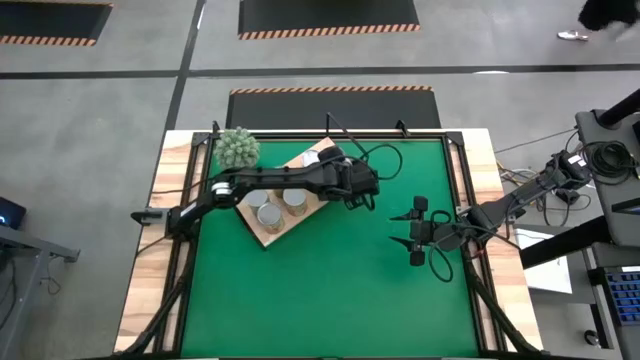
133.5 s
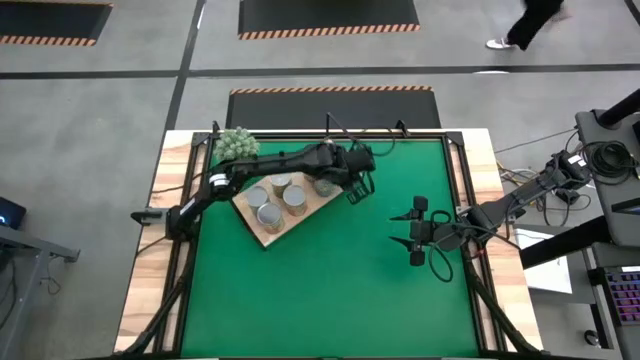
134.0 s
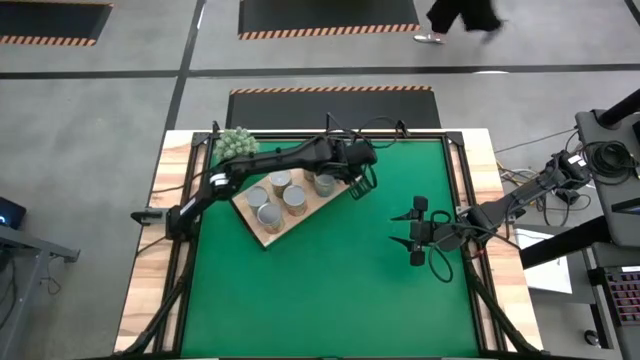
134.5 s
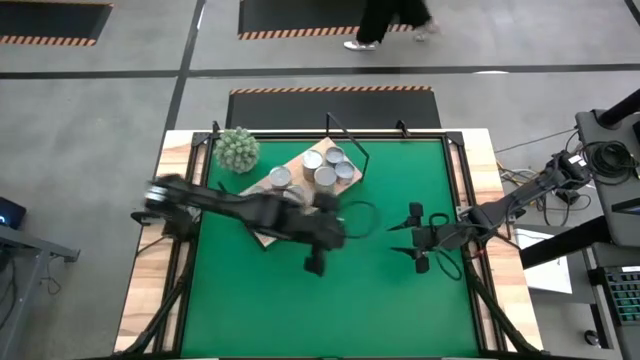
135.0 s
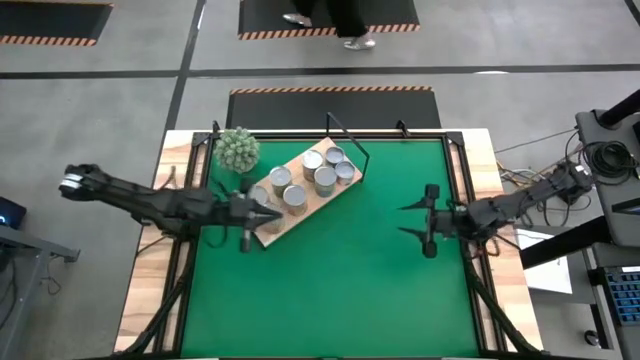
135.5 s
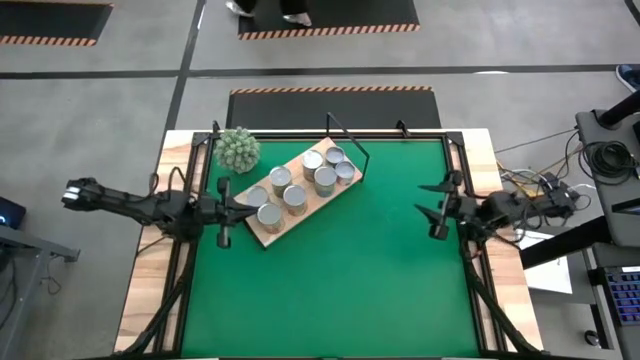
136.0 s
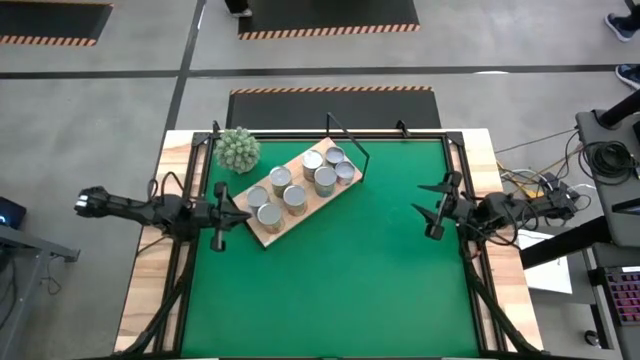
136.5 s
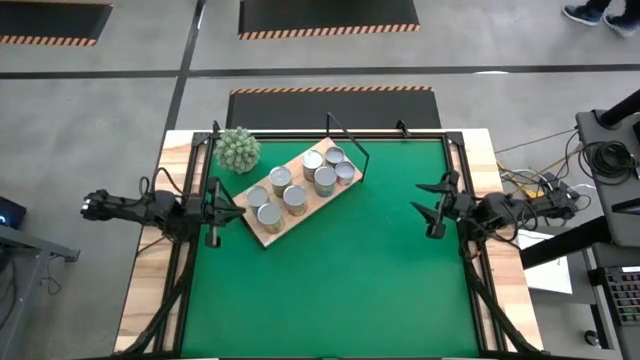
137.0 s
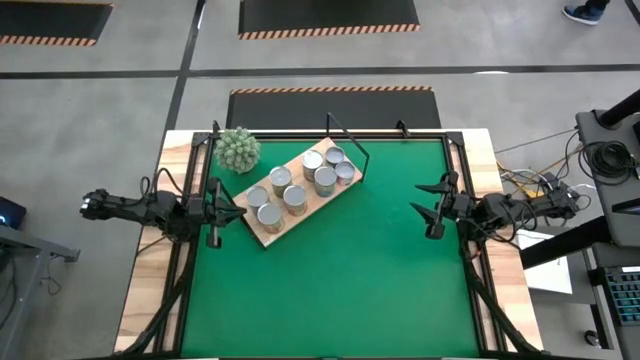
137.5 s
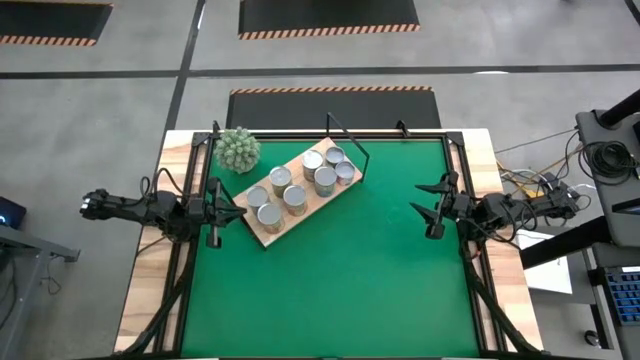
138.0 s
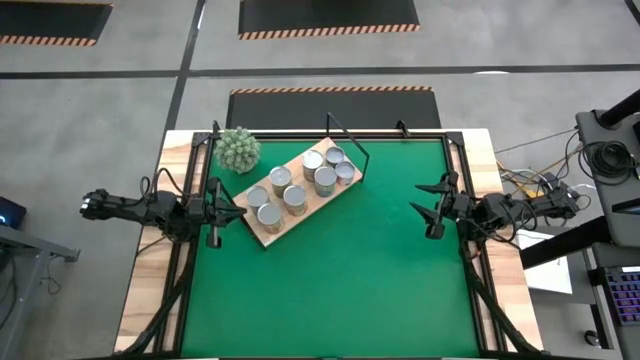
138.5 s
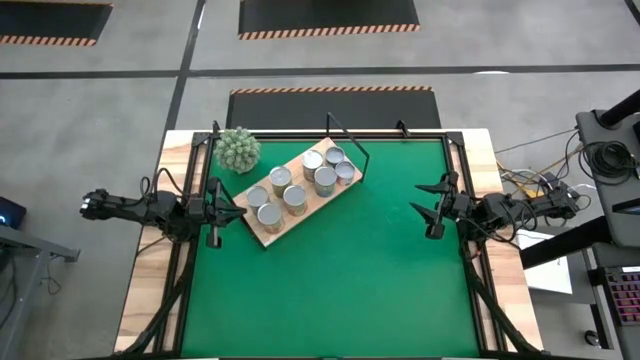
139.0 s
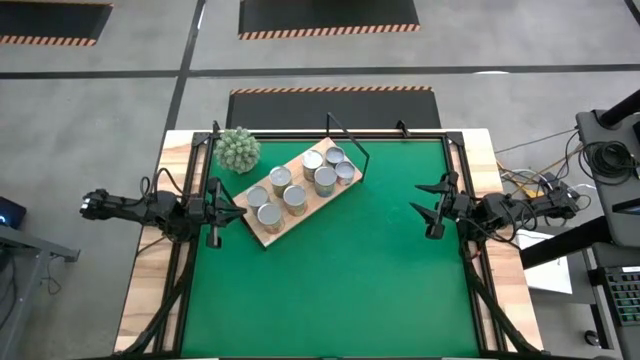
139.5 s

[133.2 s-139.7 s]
Task: Pick and place cans onto a shelf
Return to Home Position

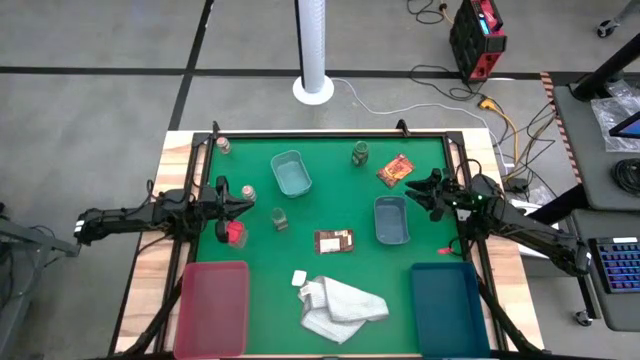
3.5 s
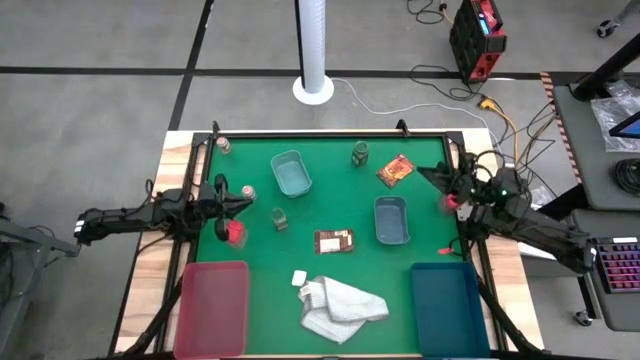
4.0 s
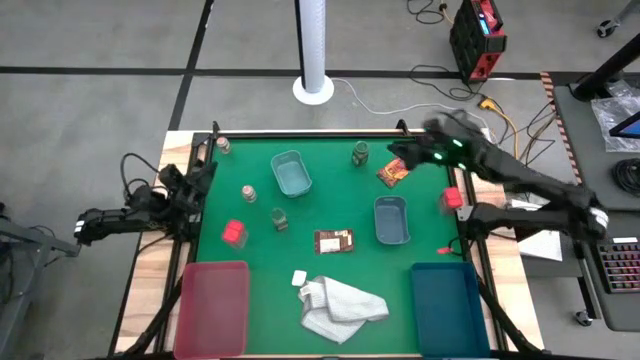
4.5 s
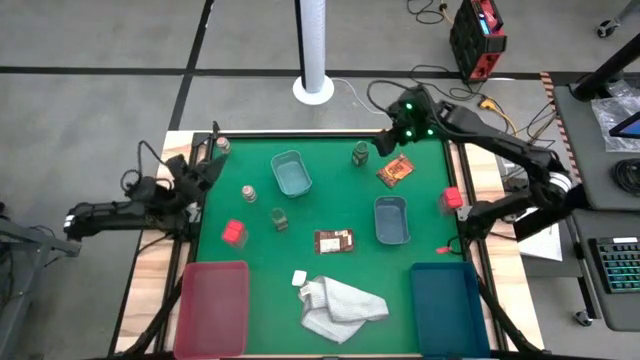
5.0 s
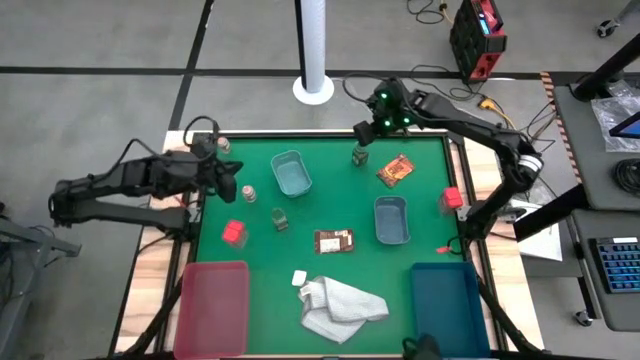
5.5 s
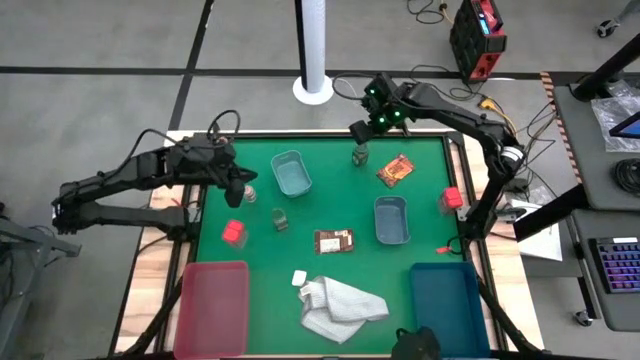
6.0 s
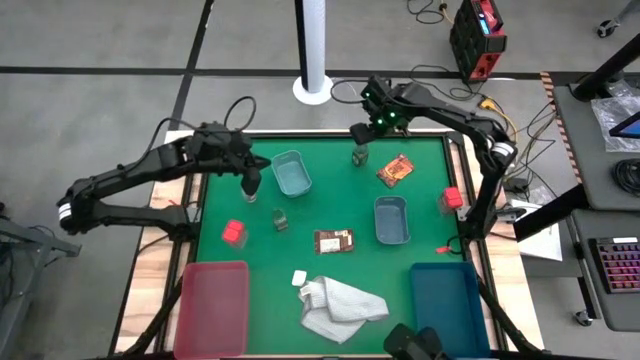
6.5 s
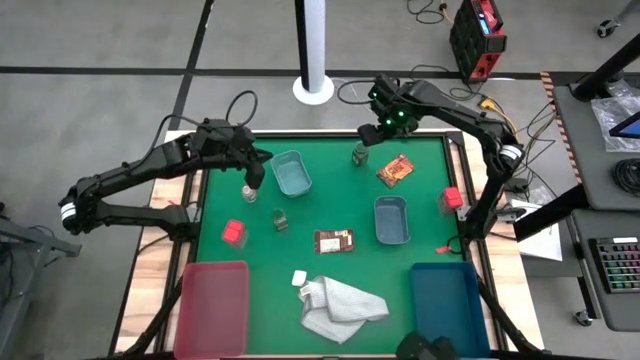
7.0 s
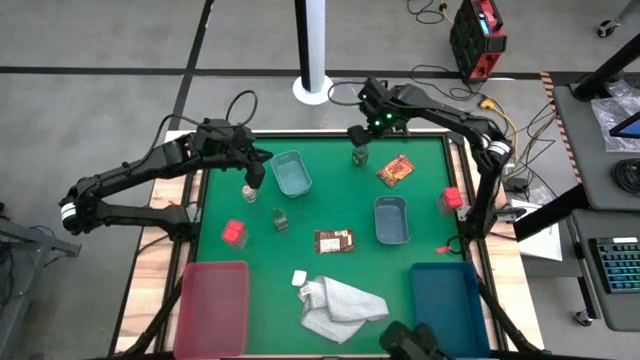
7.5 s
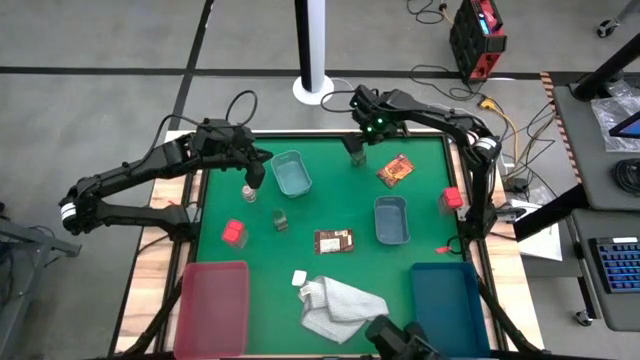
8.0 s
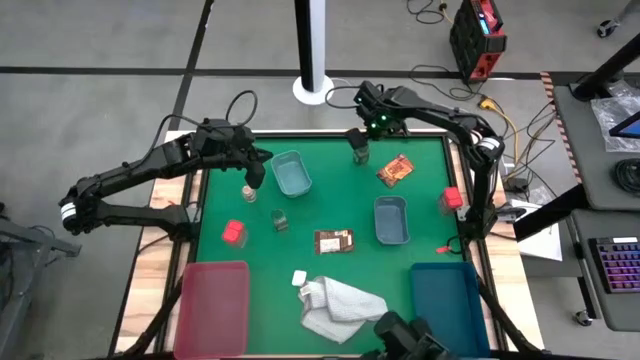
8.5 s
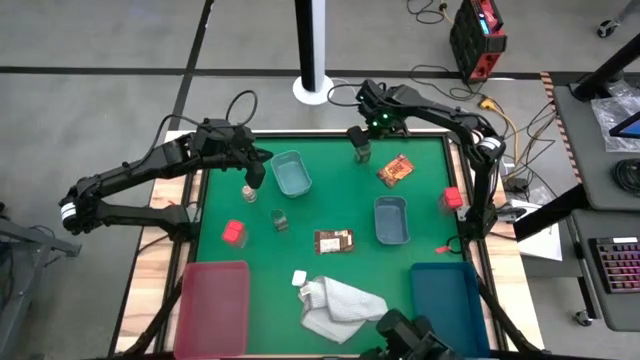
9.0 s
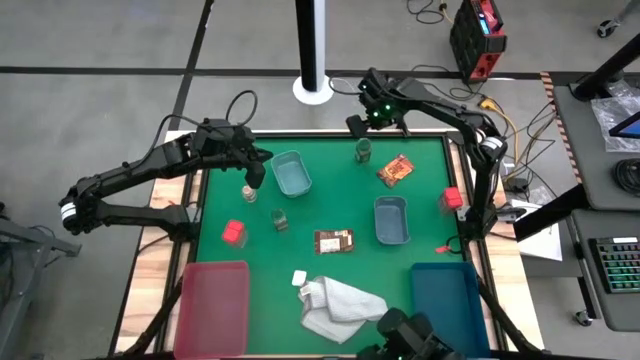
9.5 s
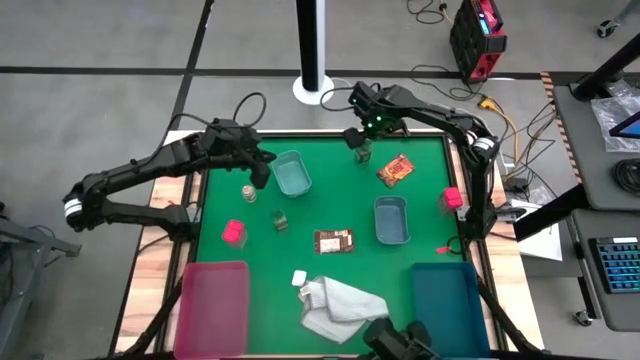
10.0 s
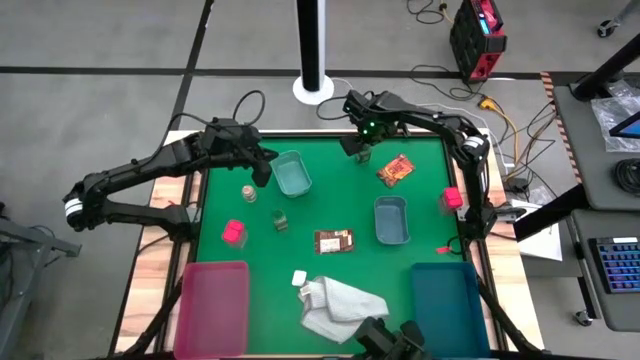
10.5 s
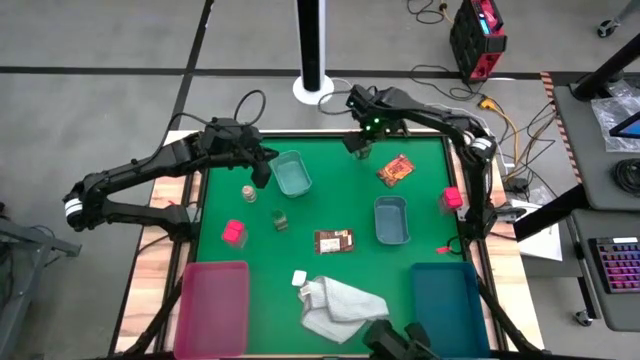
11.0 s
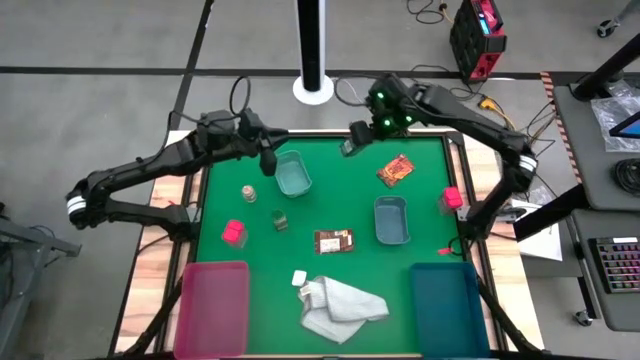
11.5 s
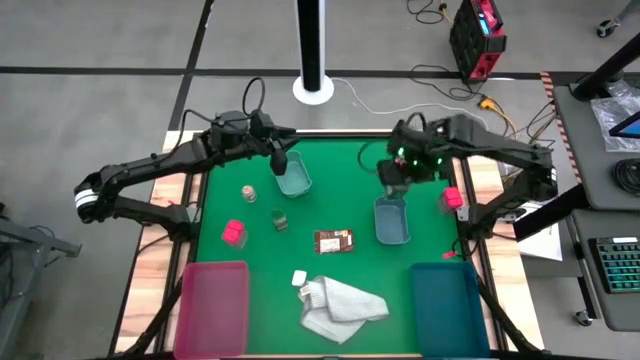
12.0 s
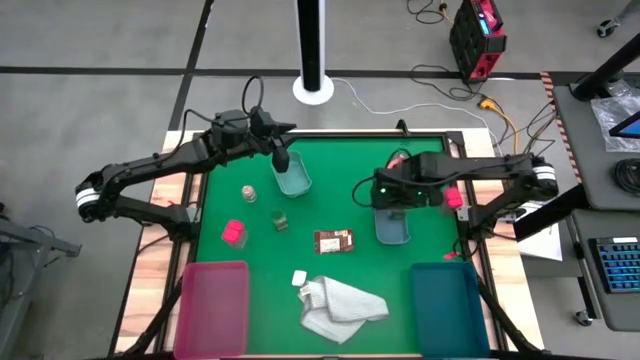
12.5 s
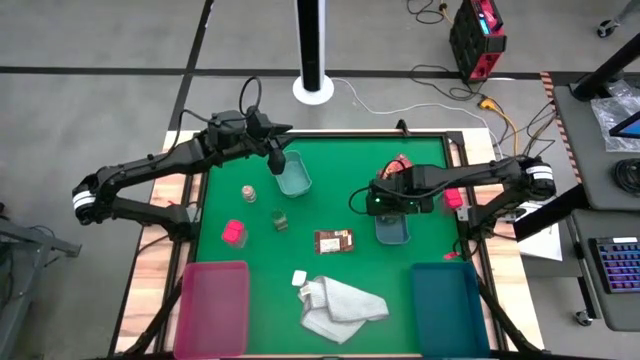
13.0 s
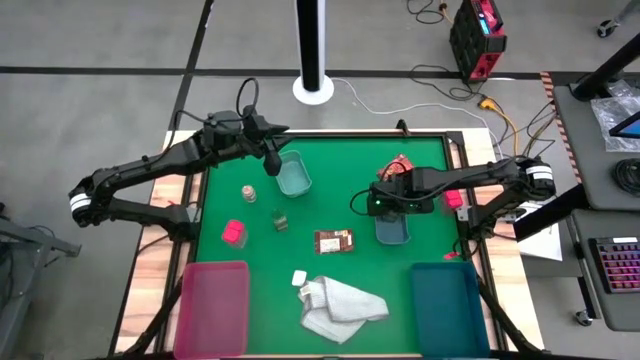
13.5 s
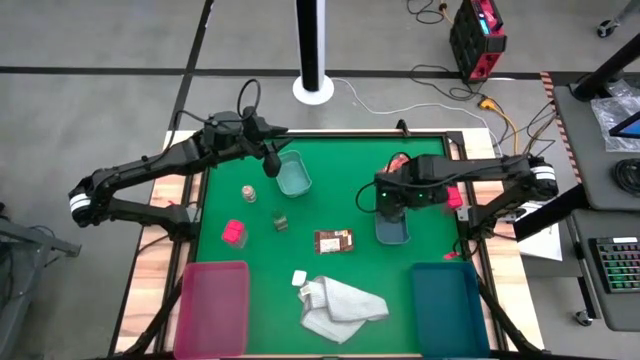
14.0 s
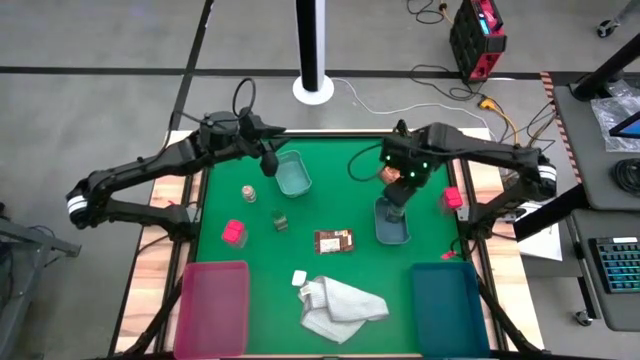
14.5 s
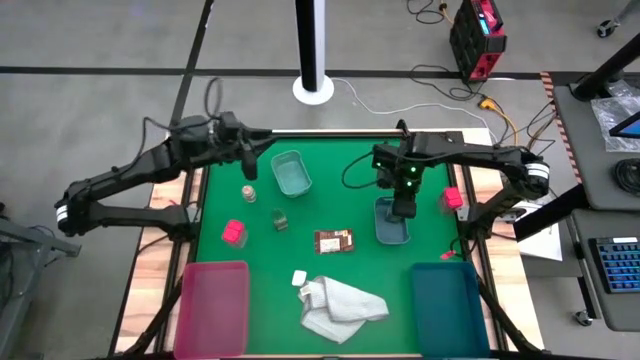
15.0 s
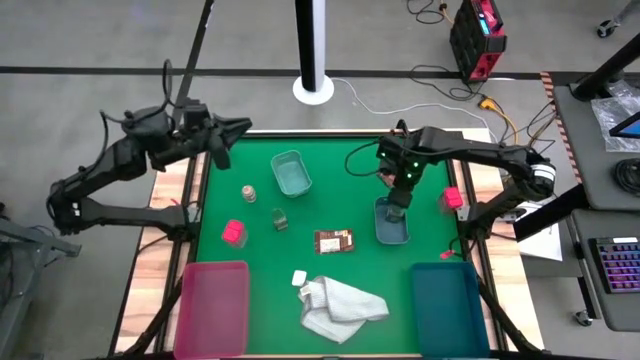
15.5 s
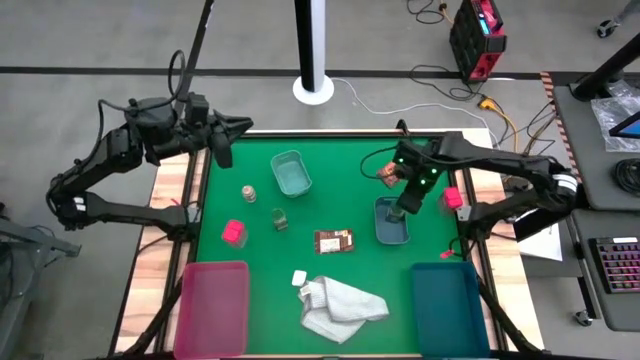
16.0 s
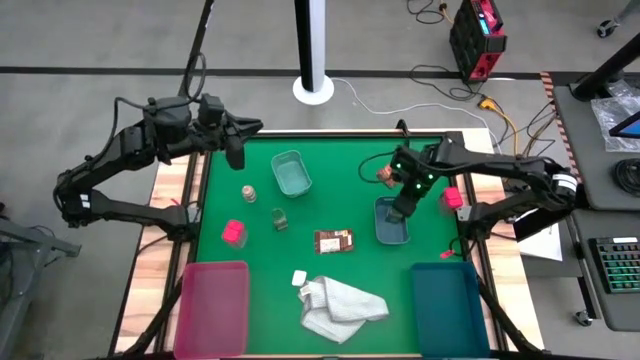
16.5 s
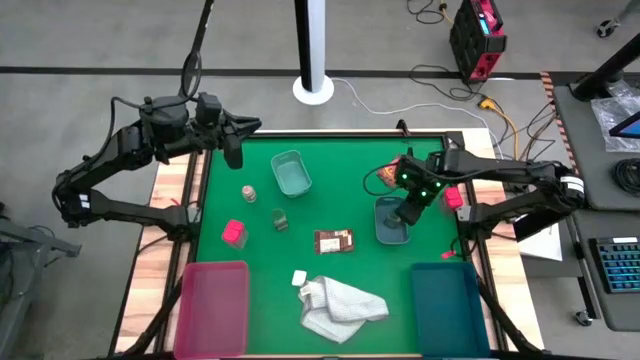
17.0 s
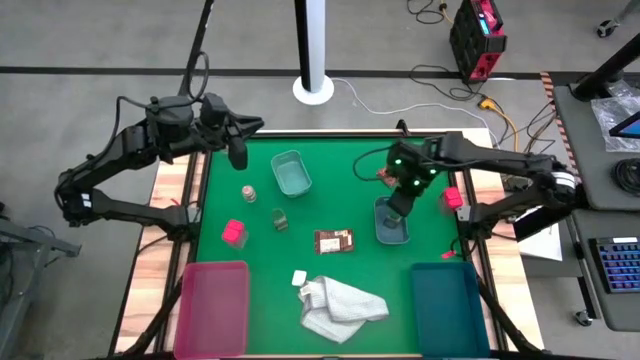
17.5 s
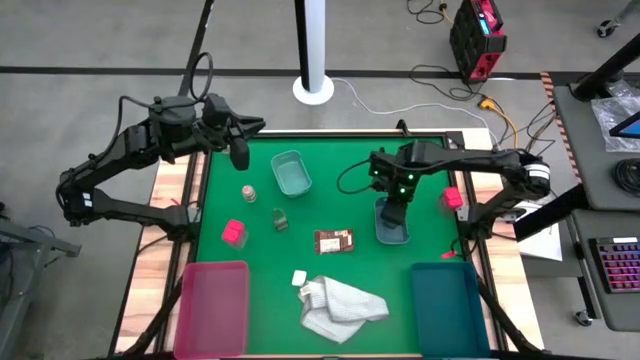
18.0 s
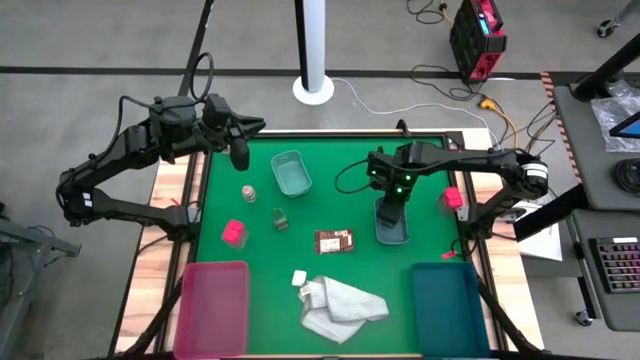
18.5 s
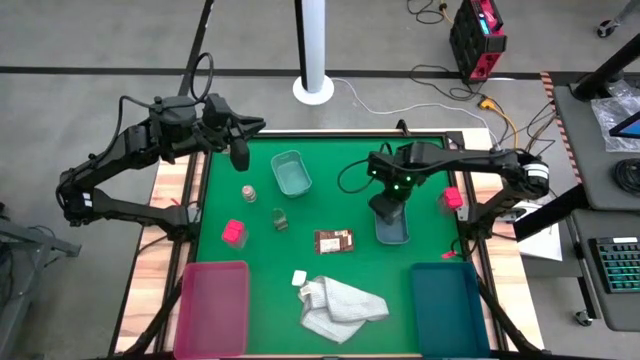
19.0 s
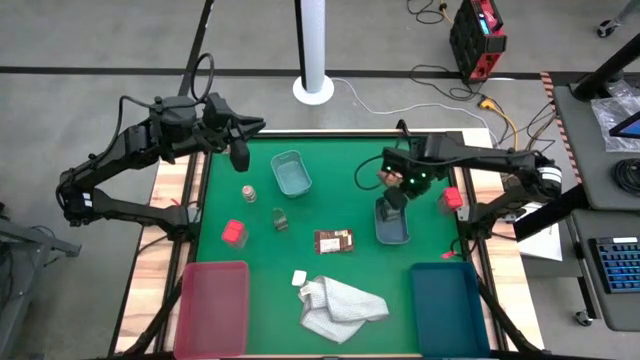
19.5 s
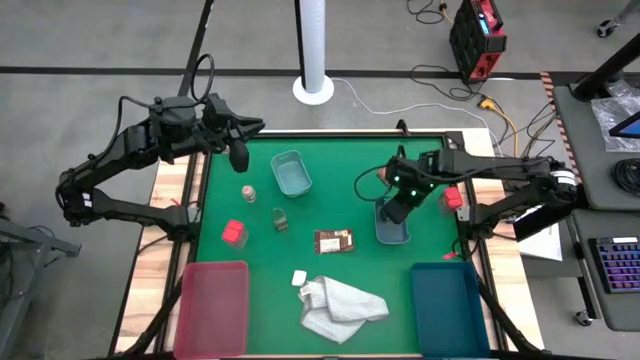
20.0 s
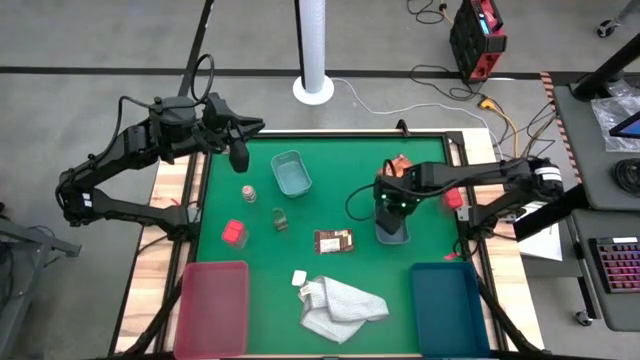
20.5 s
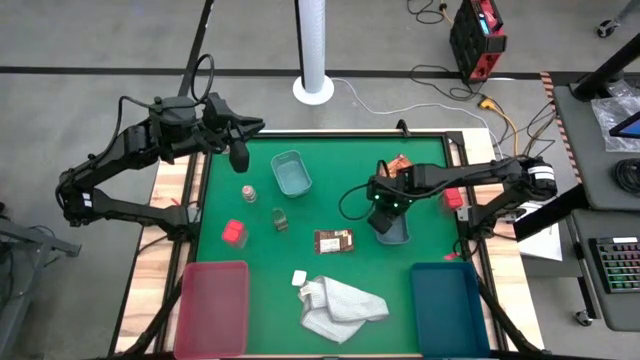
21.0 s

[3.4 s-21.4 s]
Task: Sort spices by type
Put the top green spice bottle into the blue bin
